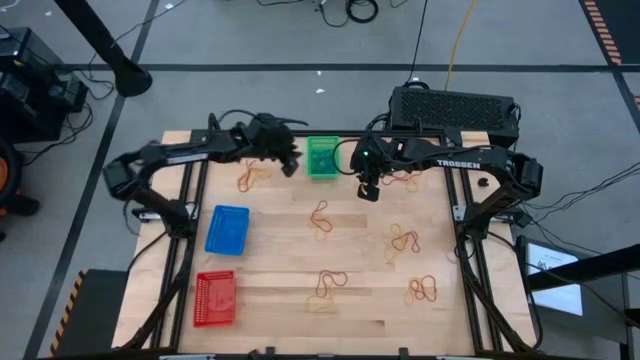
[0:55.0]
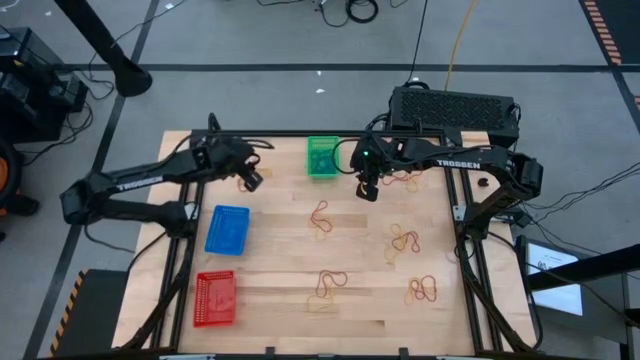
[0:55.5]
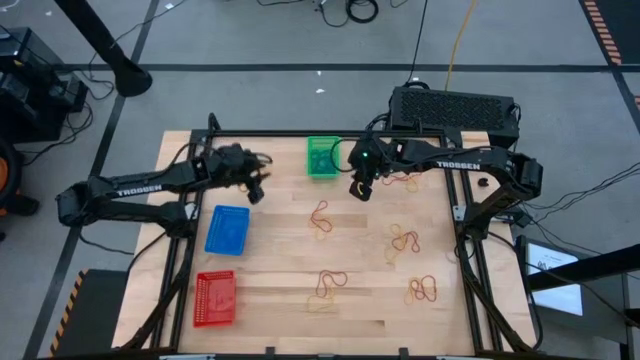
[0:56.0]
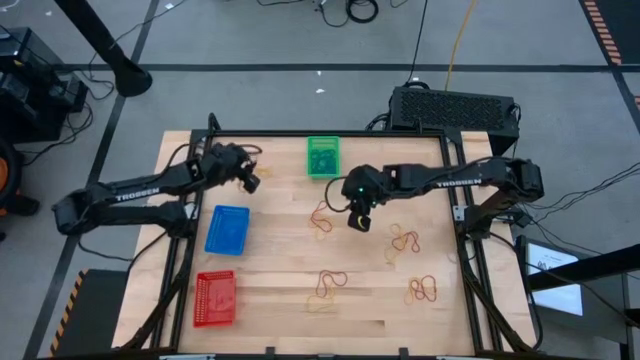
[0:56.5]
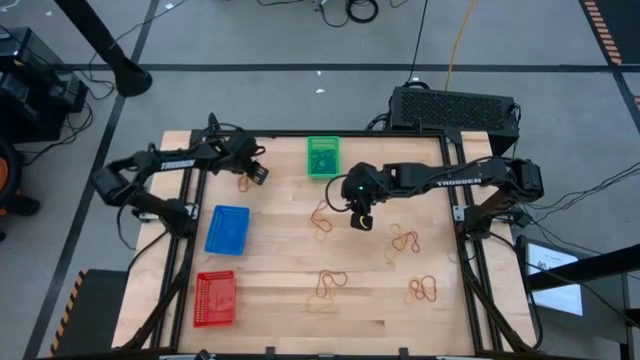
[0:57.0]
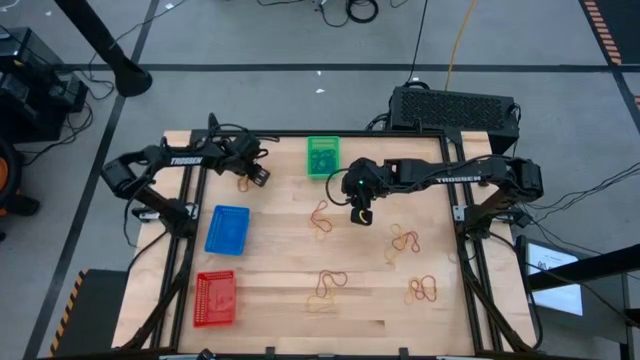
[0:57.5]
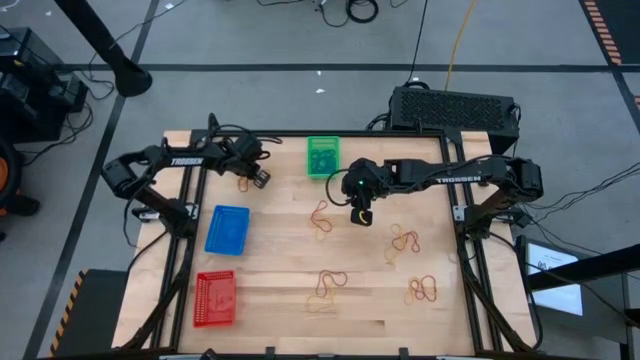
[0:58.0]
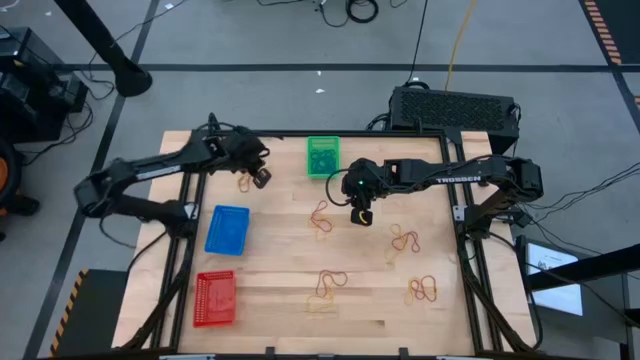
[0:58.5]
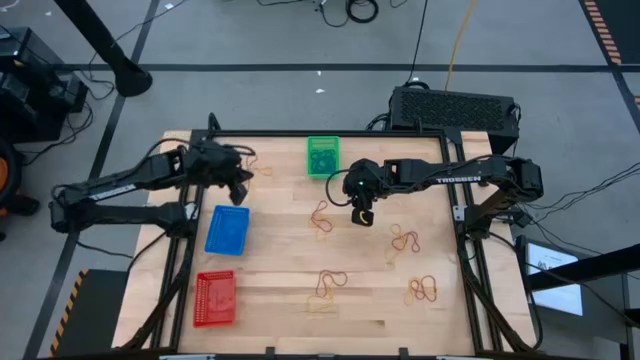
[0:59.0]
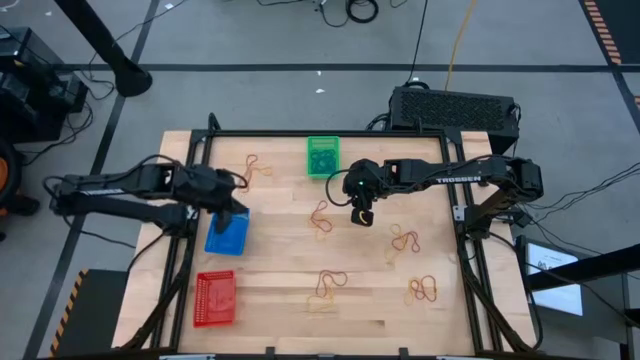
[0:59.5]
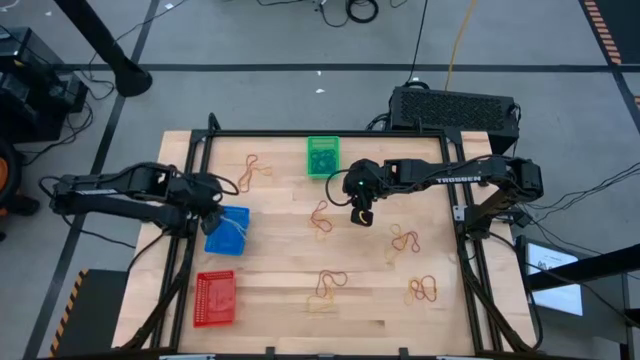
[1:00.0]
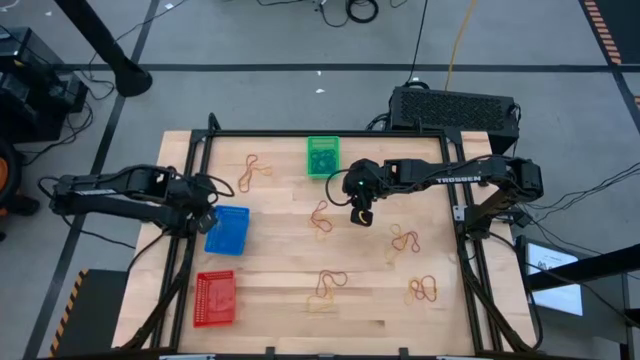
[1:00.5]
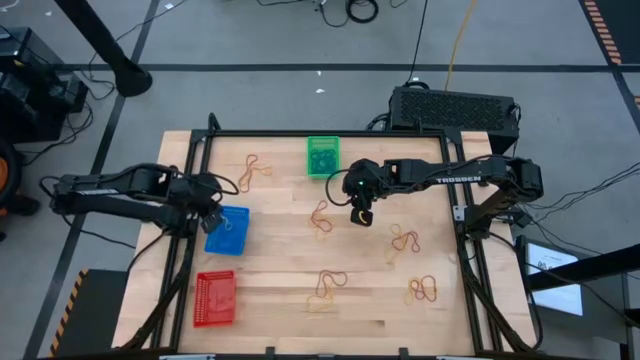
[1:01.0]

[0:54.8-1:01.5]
Task: Sort rubber bands into baskets
Put the yellow rubber band into the blue bin

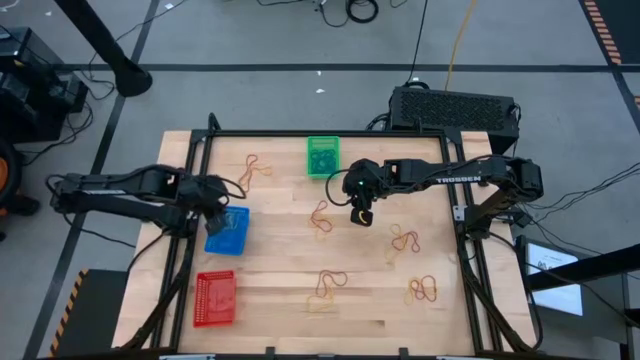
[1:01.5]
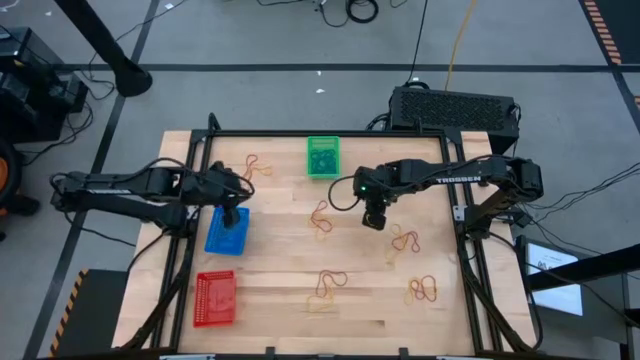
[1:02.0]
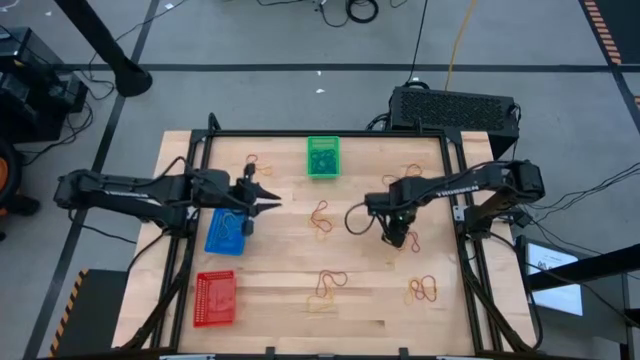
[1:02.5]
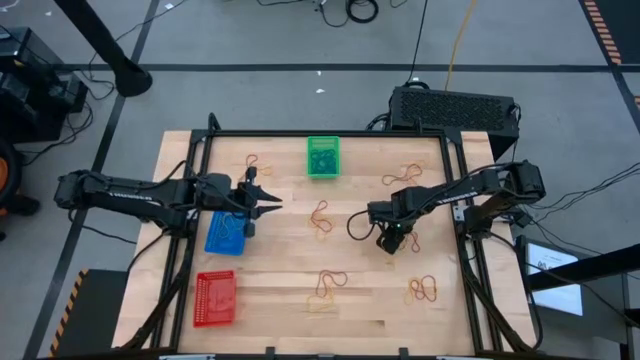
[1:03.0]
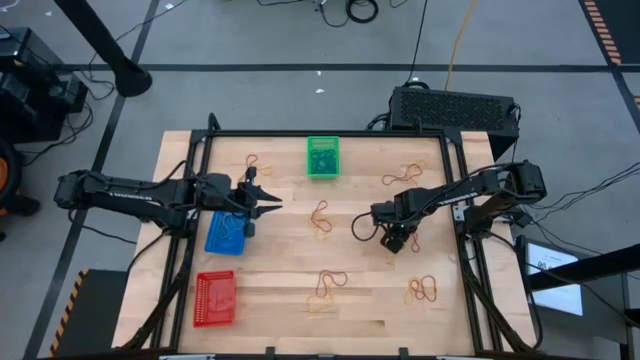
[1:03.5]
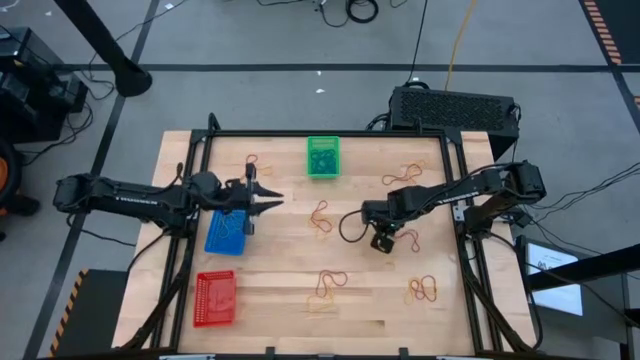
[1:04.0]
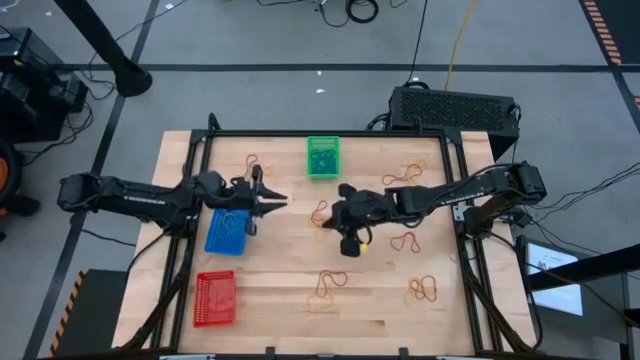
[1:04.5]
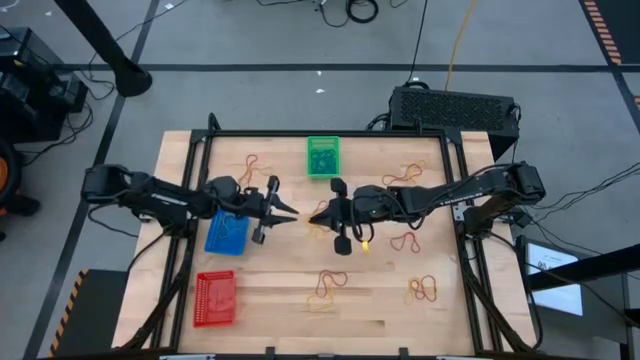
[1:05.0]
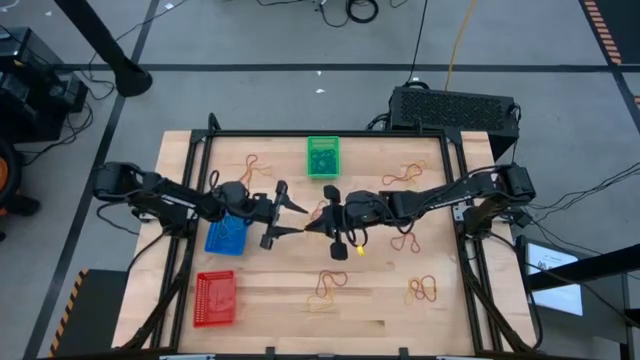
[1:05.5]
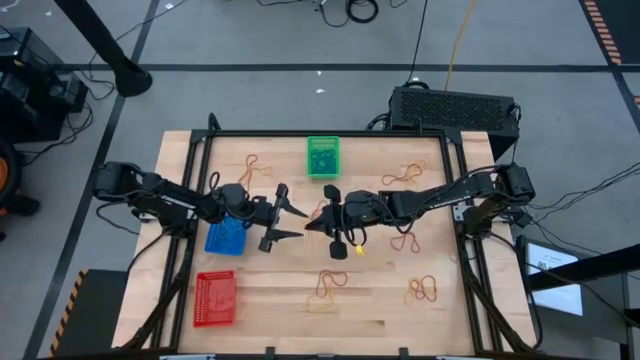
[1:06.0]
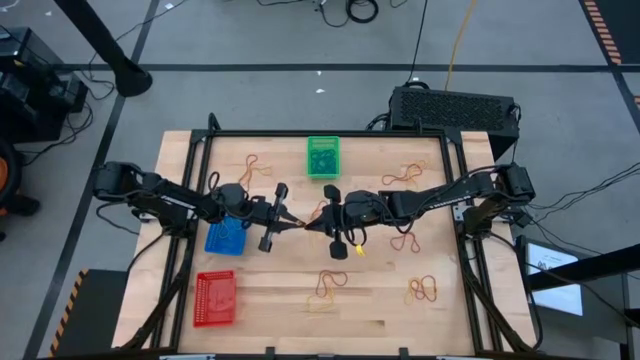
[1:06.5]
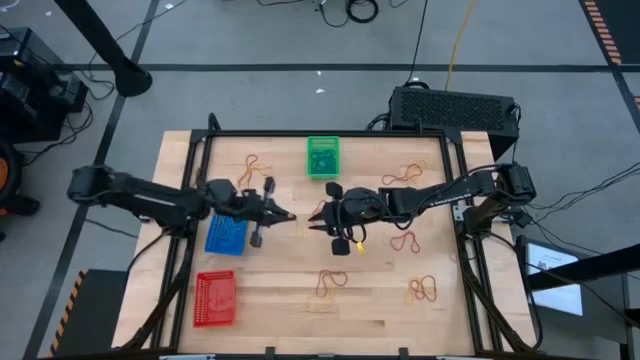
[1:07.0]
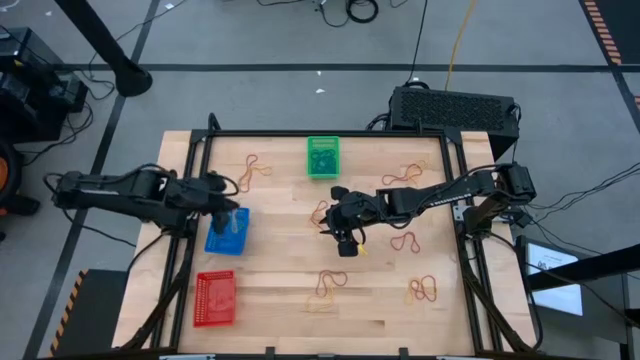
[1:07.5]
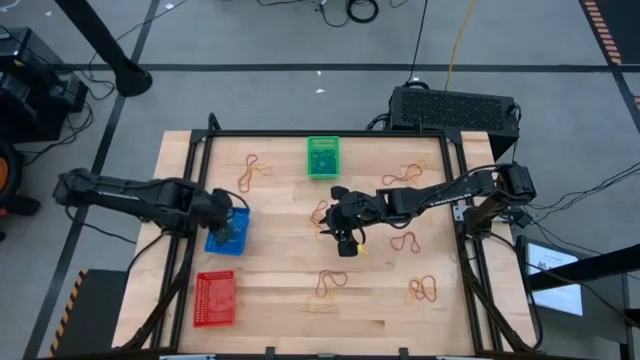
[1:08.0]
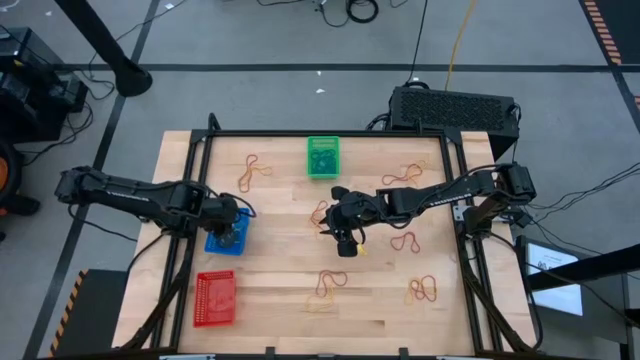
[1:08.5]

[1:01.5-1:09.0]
Put the yellow rubber band into the blue bin

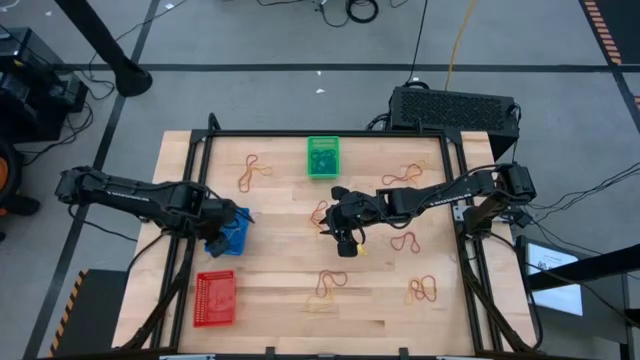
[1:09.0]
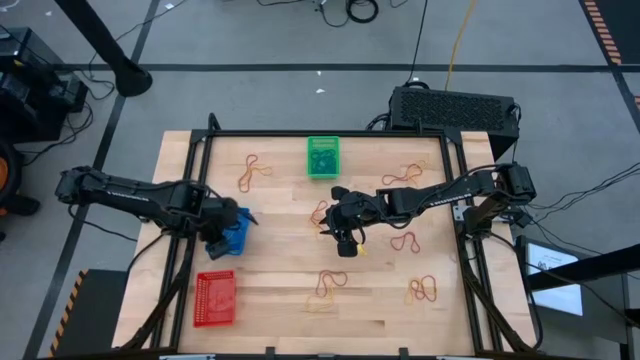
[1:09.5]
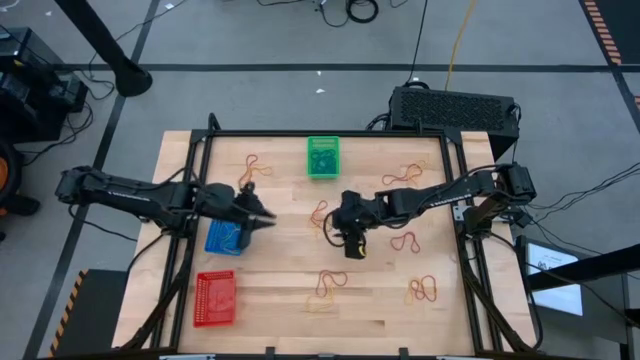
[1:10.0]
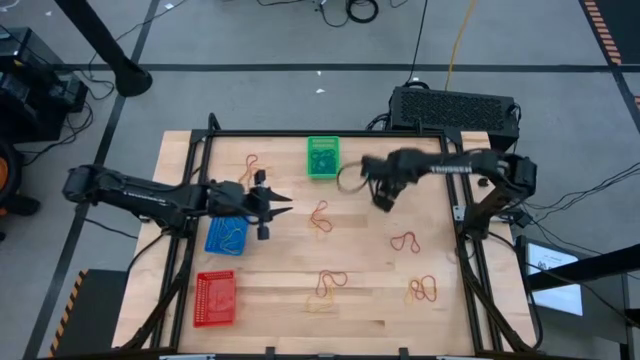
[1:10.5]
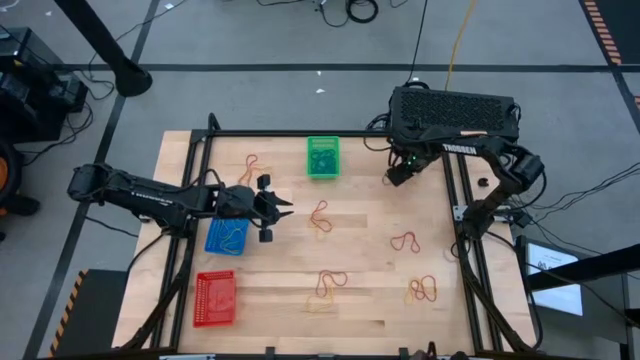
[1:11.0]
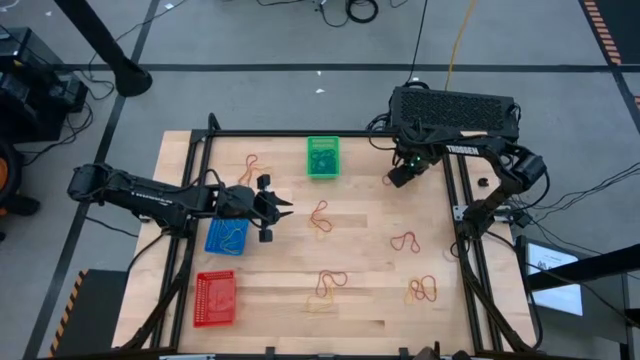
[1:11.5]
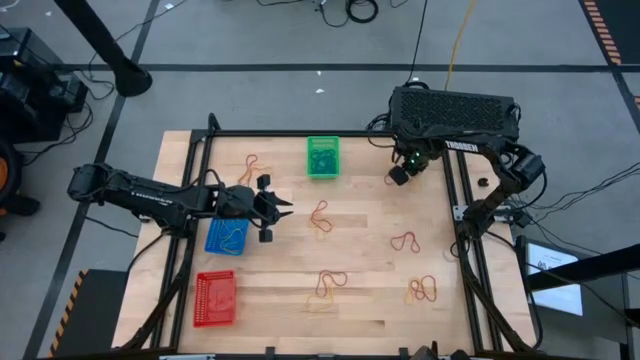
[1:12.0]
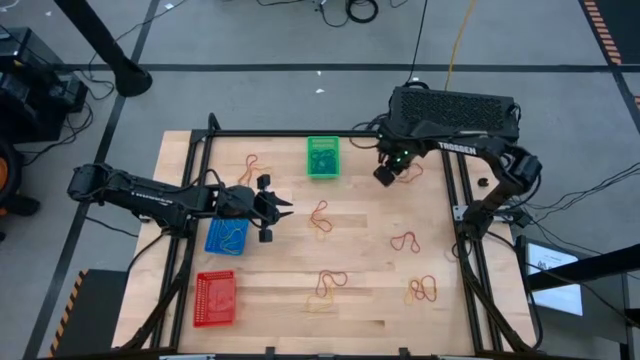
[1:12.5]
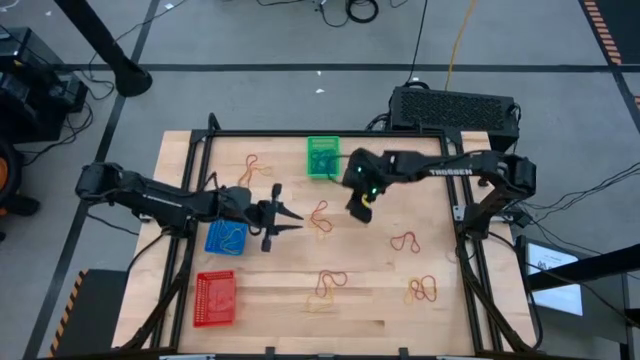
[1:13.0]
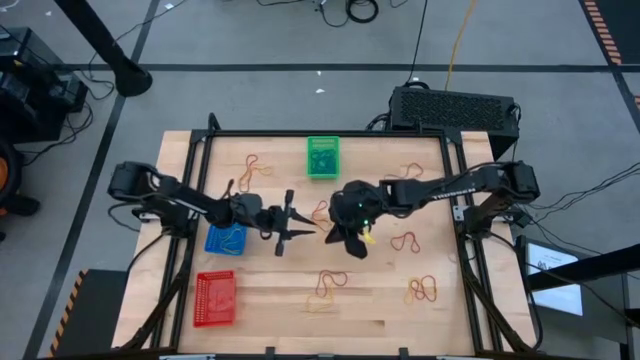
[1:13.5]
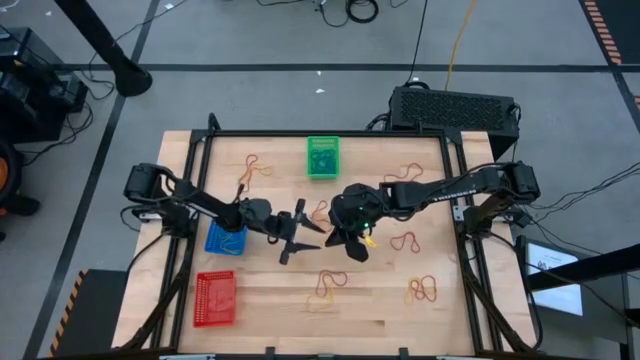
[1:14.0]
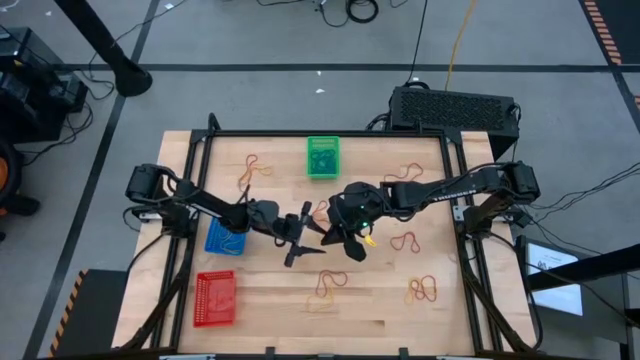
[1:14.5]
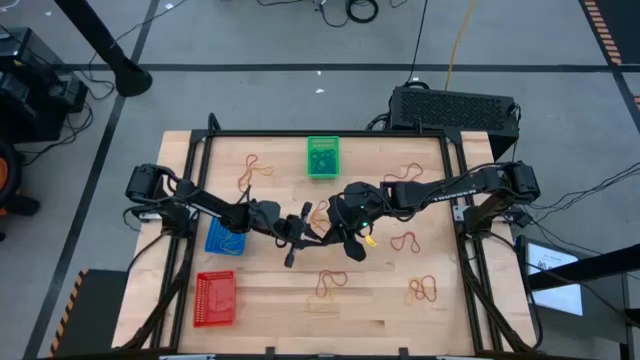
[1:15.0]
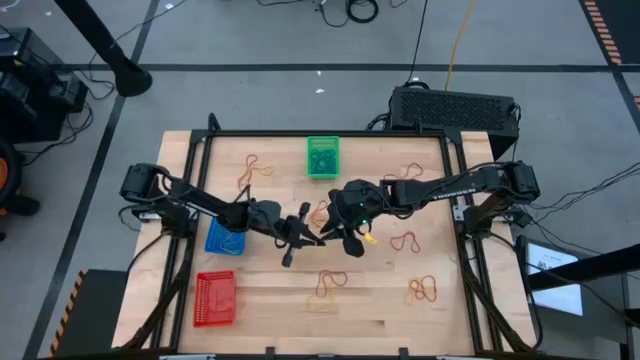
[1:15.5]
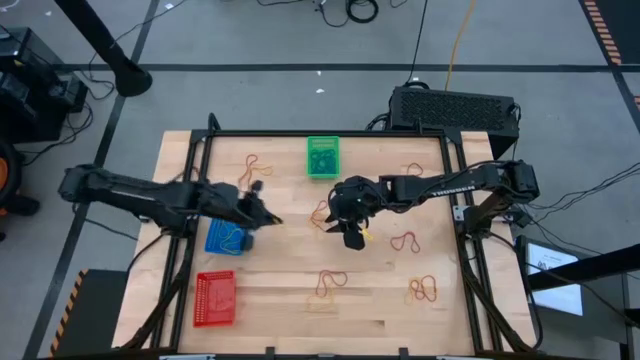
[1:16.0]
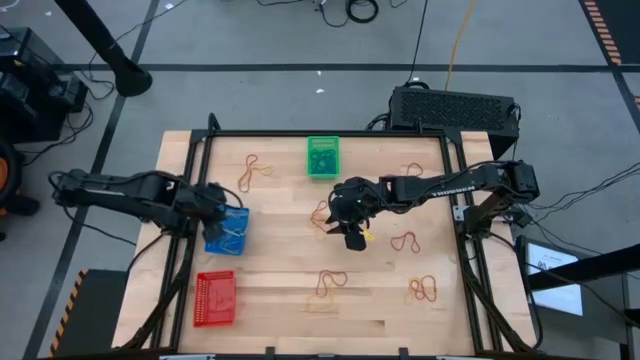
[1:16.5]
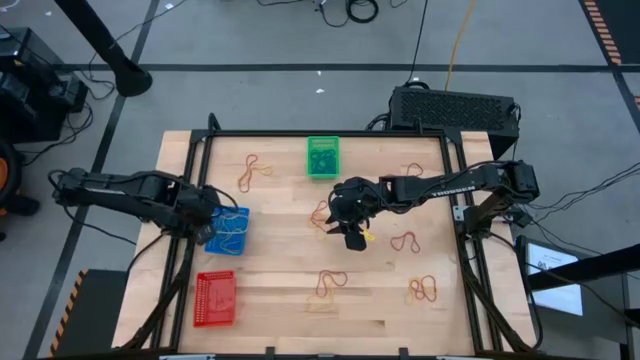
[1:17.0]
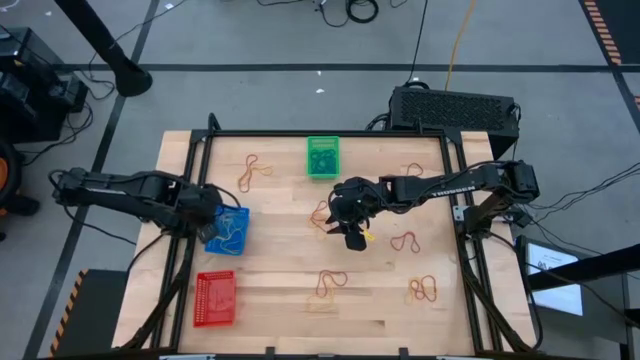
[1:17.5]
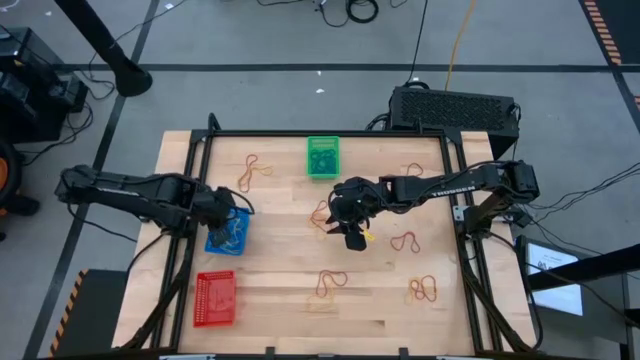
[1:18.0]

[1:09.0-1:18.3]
Put the yellow rubber band into the blue bin
